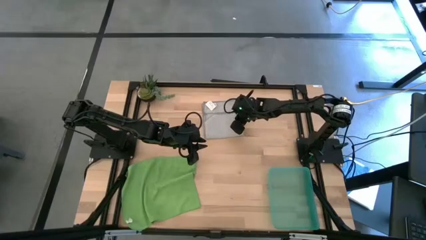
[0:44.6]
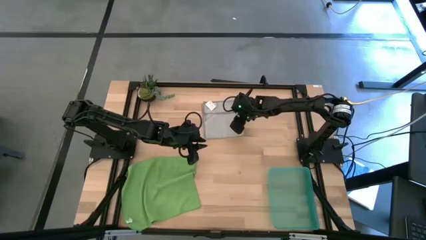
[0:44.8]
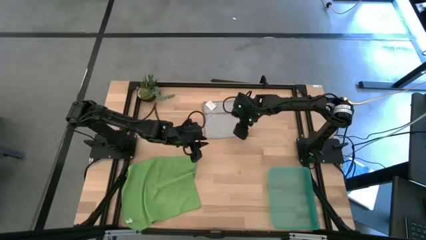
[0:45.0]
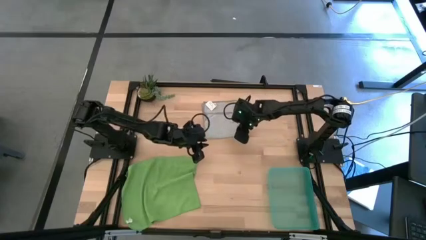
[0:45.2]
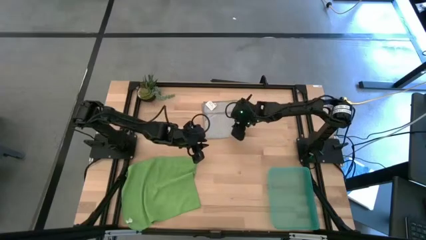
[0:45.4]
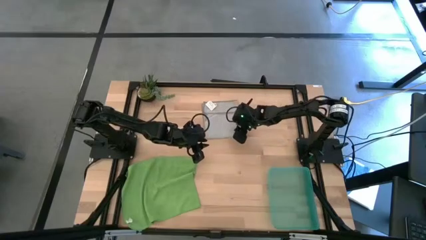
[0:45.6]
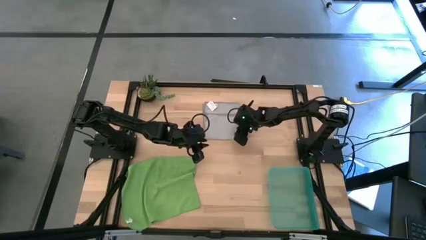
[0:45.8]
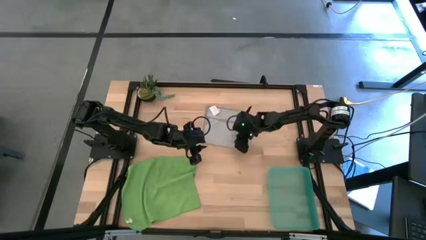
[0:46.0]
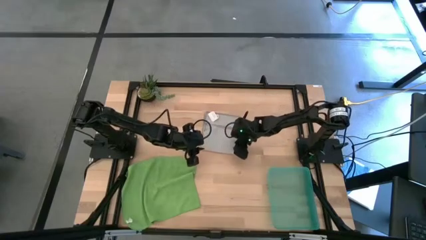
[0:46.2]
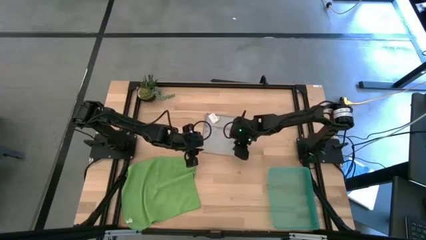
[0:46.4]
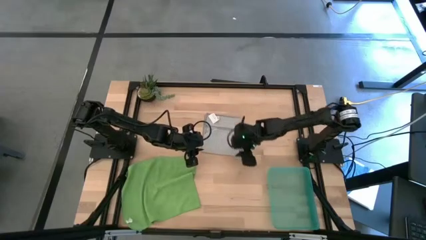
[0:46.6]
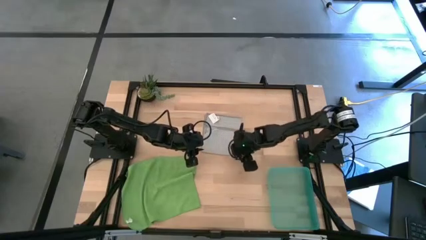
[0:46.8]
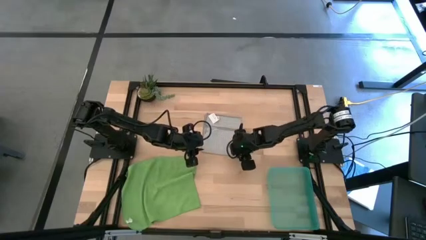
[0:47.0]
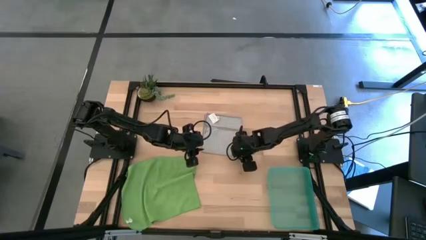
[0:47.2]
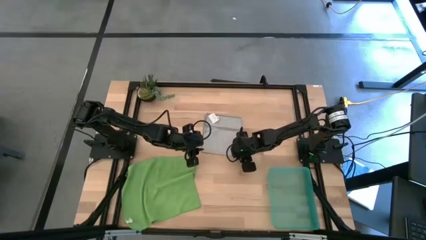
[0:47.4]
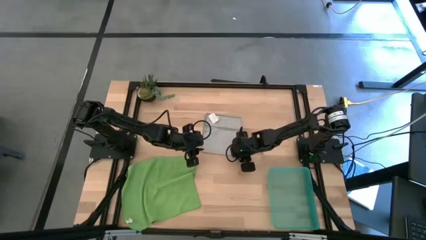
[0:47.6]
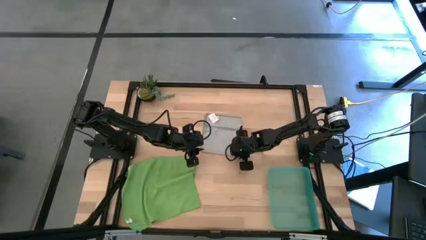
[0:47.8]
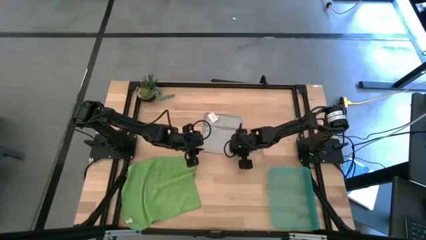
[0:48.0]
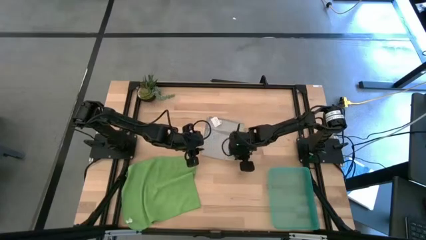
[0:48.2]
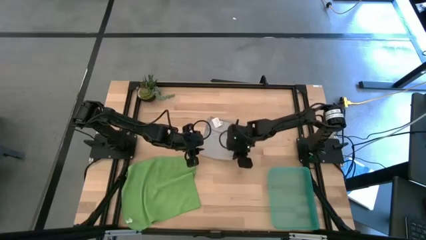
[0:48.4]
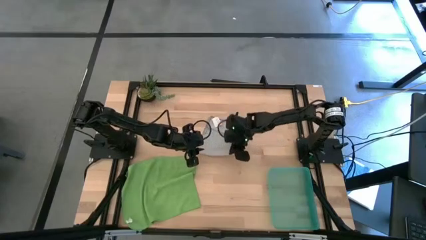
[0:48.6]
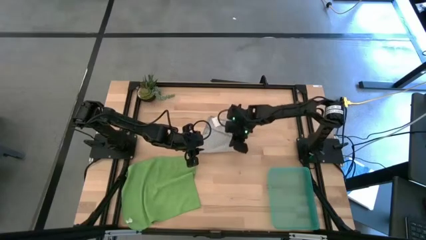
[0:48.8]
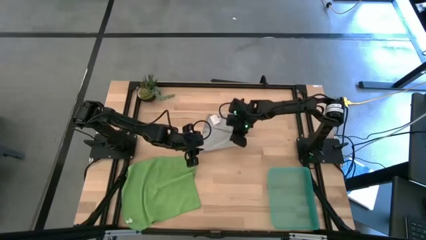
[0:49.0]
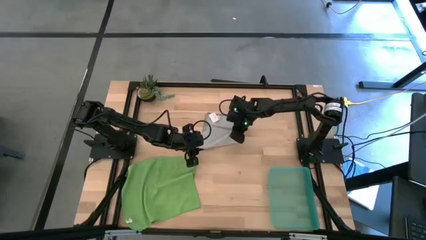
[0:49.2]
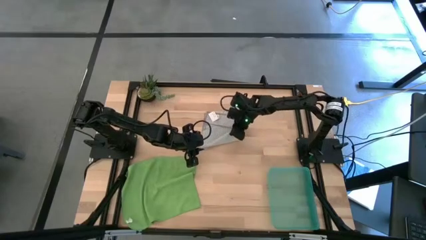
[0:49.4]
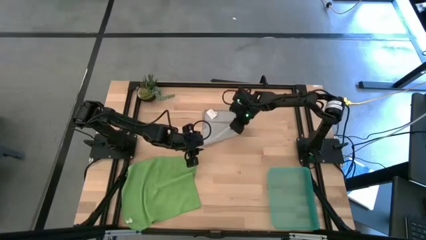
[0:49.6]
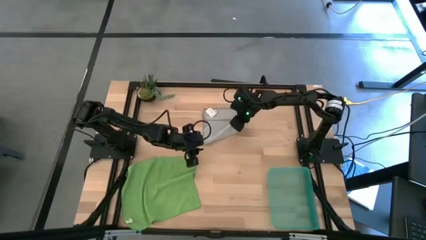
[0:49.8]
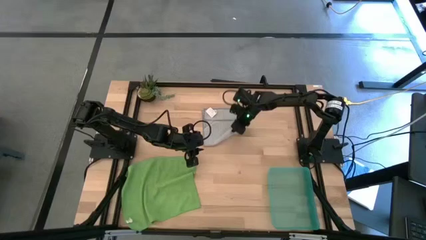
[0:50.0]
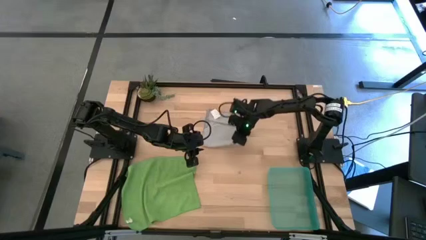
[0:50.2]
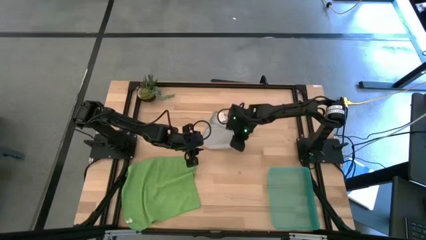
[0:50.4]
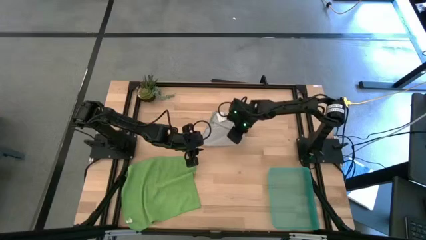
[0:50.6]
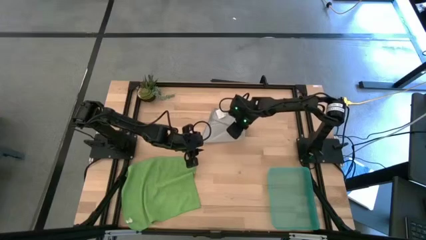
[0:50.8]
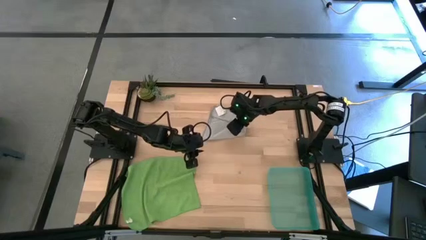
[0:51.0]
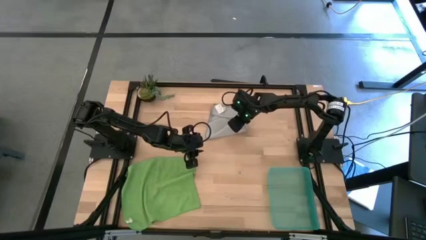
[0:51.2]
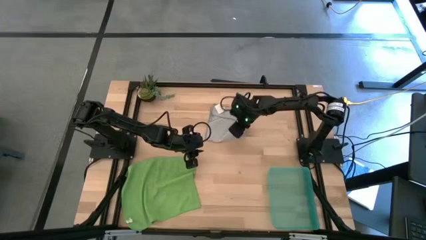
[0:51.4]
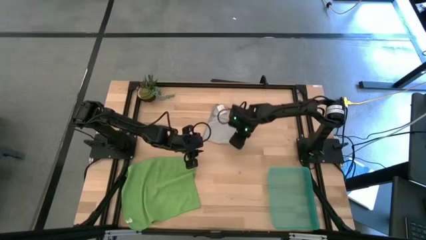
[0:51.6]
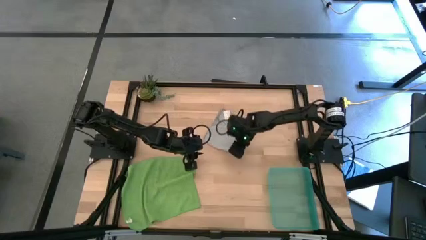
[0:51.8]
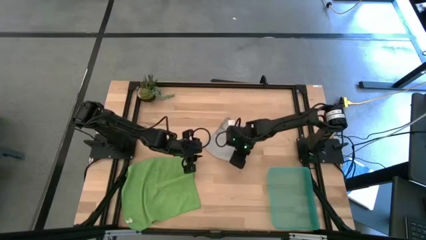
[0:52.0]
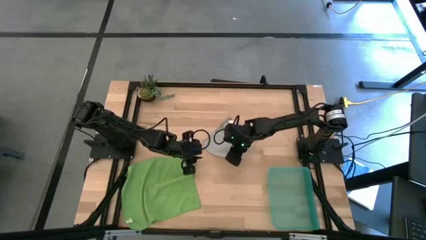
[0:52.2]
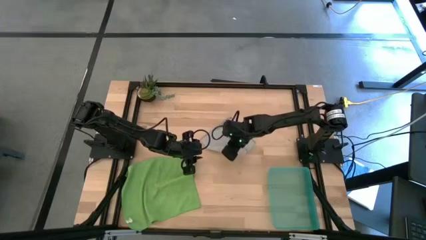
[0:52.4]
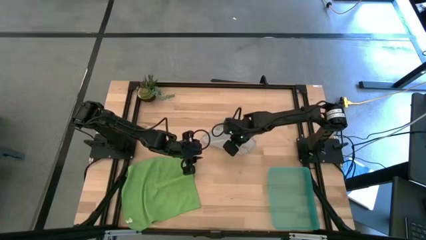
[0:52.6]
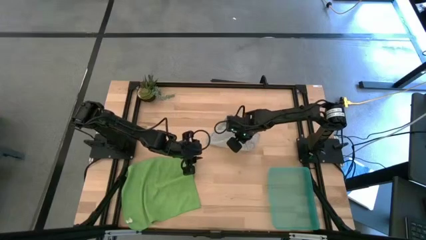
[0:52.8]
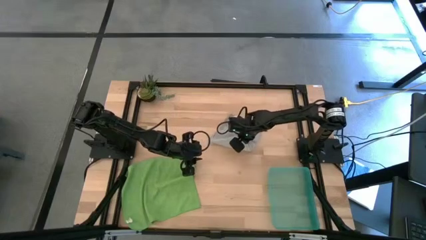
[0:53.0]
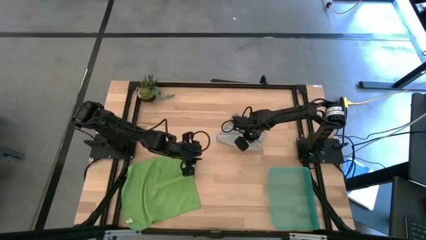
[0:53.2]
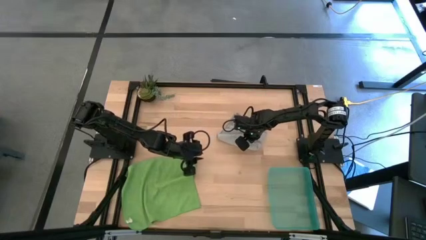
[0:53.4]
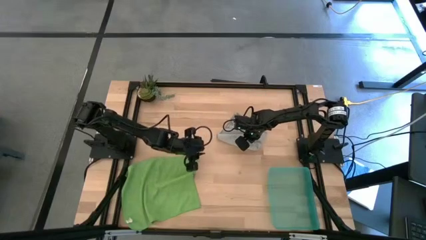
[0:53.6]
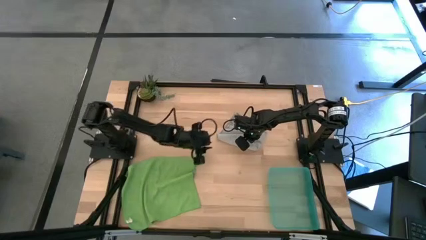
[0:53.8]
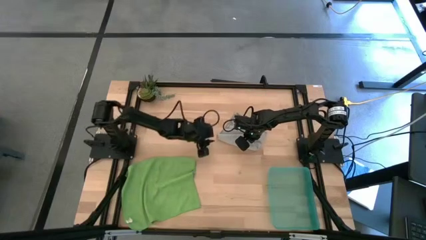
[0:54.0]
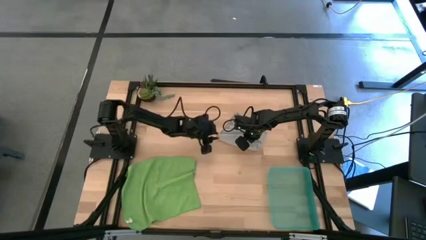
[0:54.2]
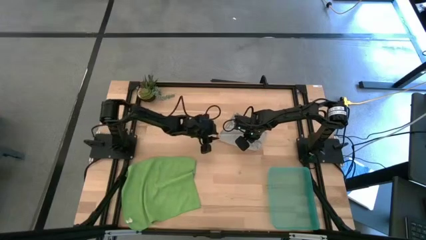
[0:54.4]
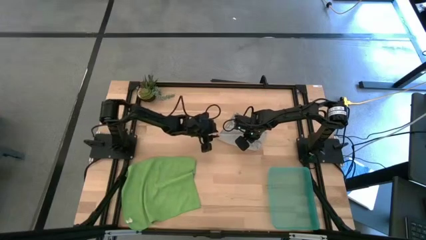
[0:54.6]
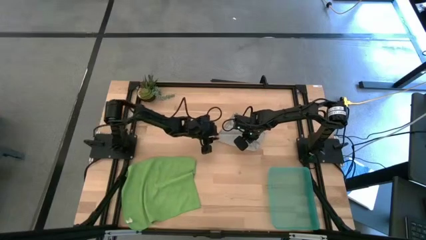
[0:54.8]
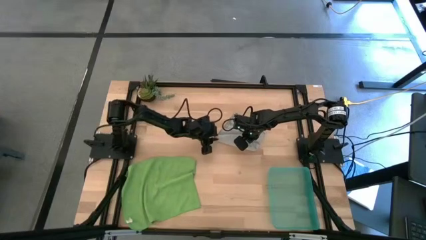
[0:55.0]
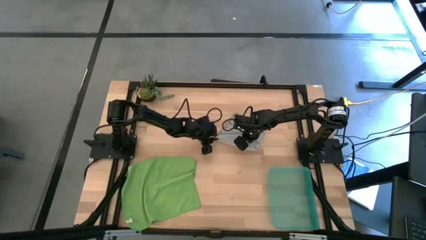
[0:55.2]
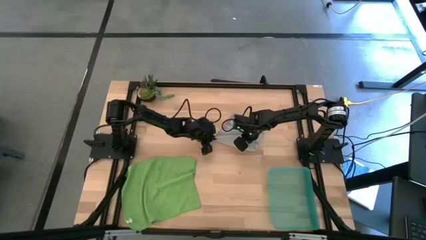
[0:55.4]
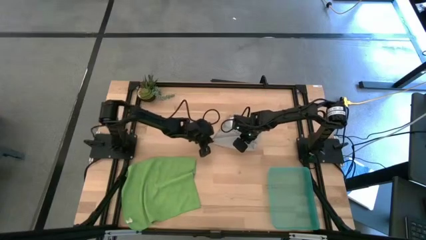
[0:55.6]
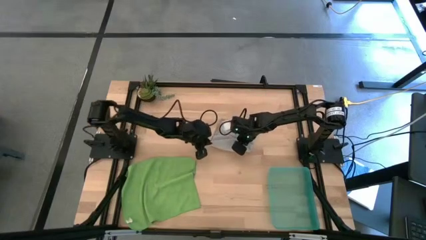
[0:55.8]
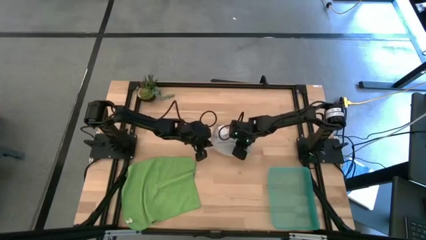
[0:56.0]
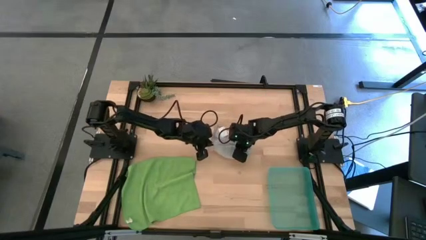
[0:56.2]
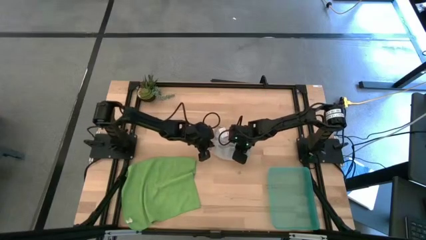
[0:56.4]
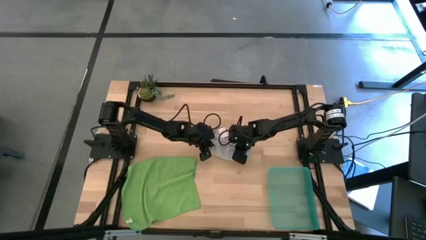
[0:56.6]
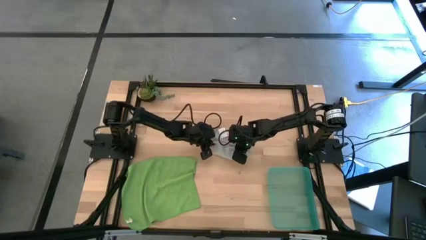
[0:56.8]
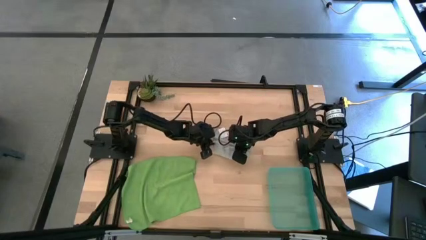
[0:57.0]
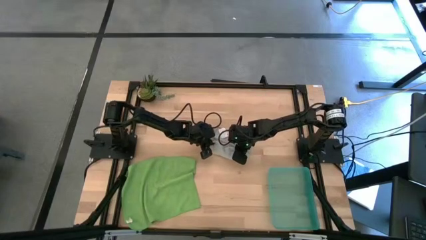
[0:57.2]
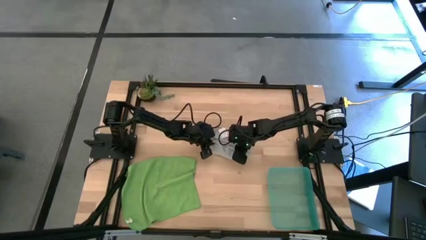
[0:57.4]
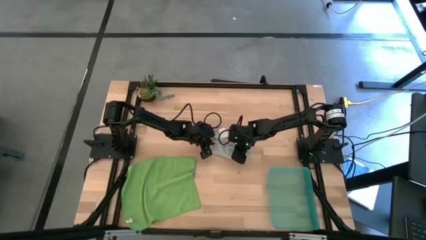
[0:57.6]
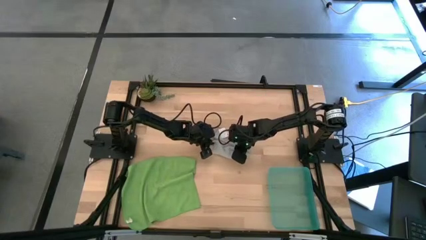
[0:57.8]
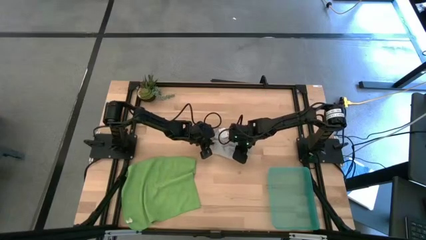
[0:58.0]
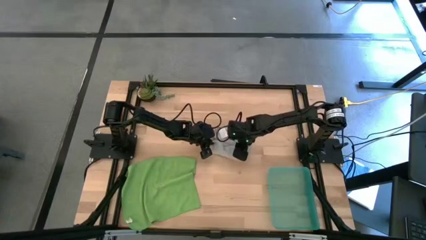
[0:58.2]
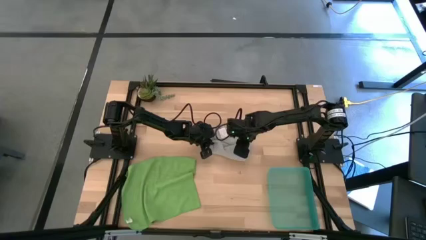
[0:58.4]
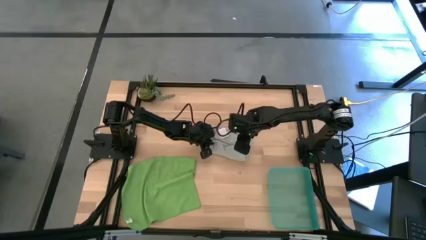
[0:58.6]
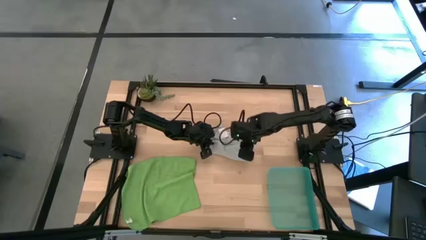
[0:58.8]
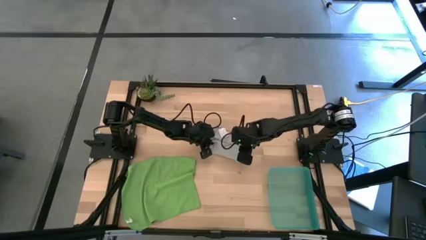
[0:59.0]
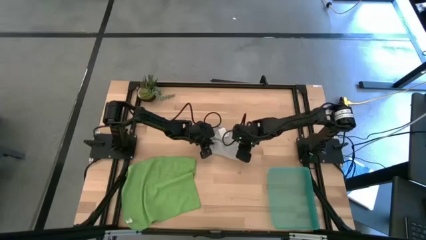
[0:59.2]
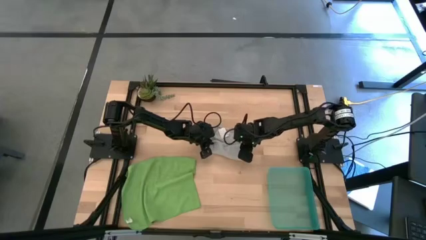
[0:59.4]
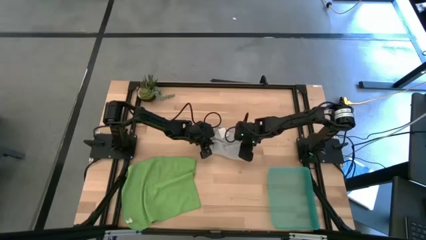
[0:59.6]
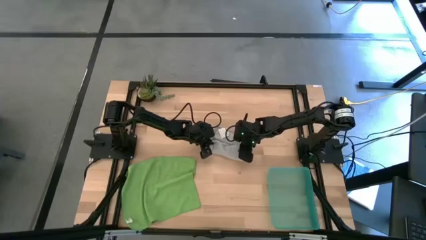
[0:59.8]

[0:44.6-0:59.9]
Task: Roll microfiber towels into tight, uniform cylinder then place into a basket
Roll the gray microfiber towel
